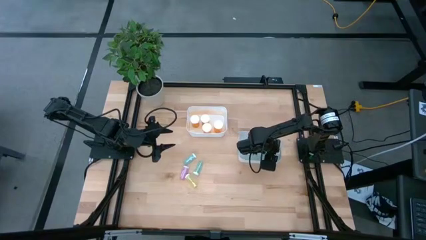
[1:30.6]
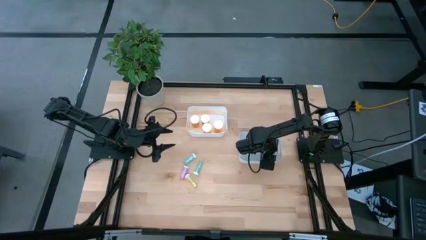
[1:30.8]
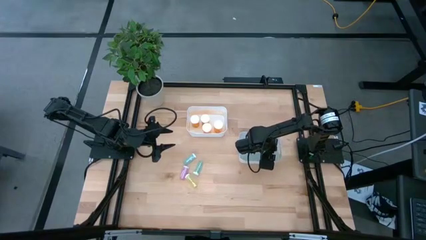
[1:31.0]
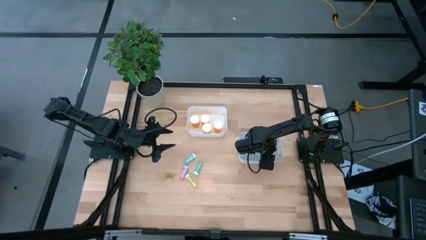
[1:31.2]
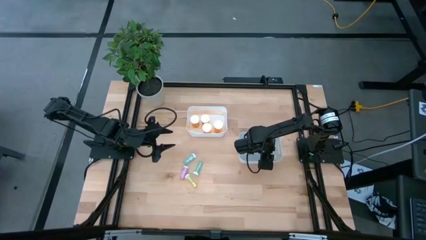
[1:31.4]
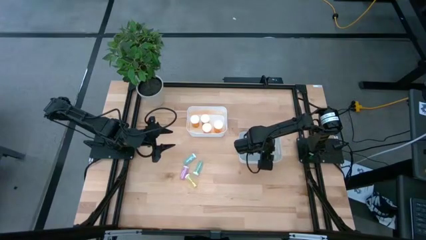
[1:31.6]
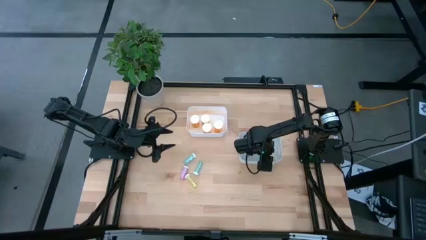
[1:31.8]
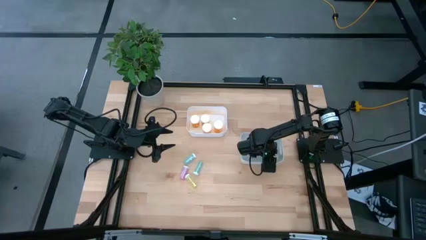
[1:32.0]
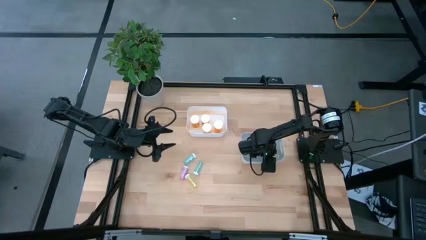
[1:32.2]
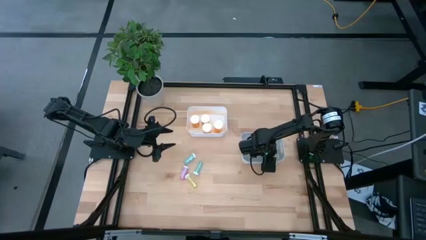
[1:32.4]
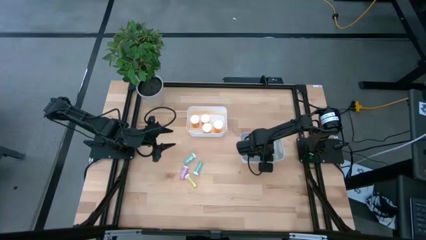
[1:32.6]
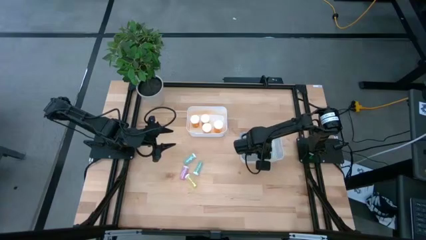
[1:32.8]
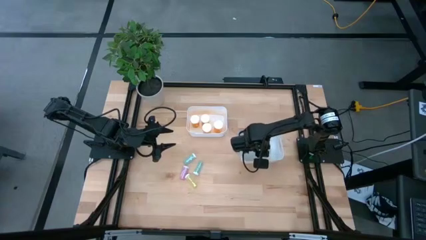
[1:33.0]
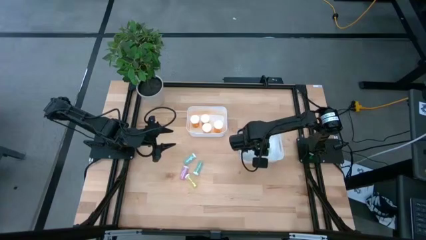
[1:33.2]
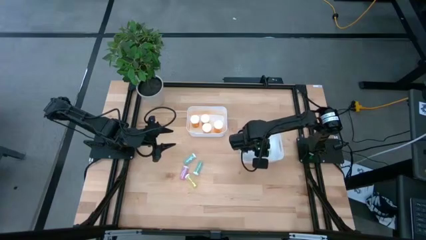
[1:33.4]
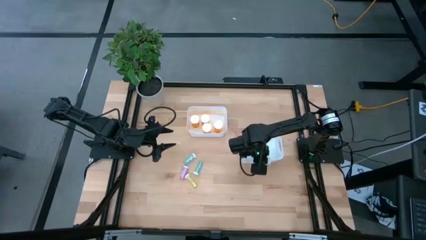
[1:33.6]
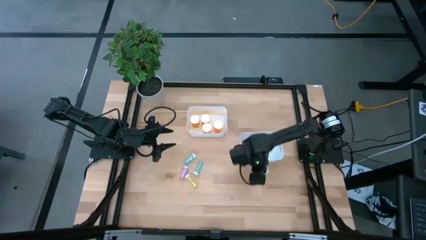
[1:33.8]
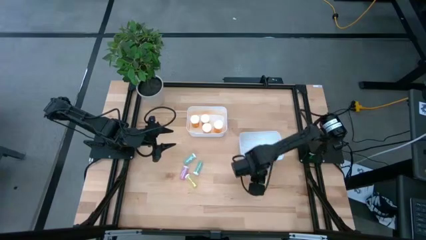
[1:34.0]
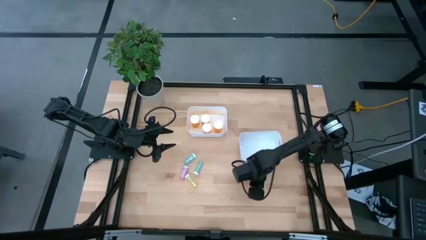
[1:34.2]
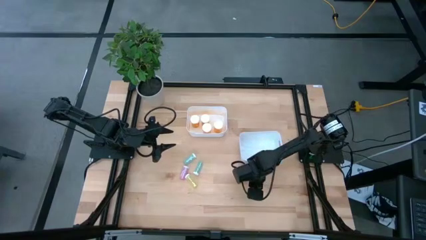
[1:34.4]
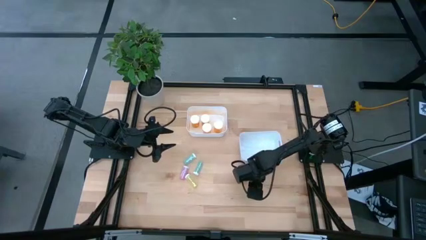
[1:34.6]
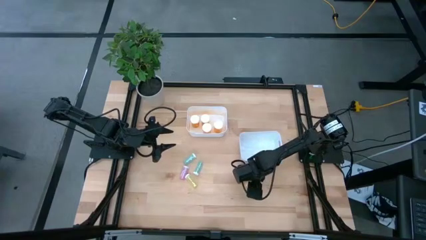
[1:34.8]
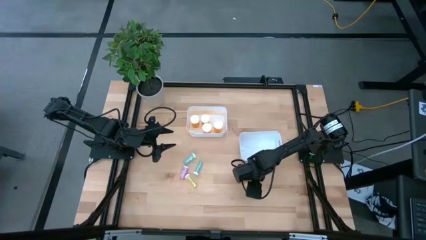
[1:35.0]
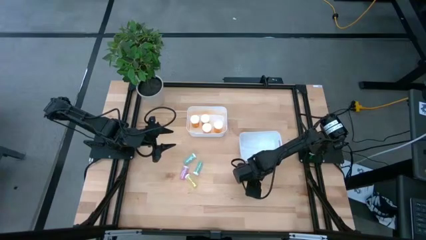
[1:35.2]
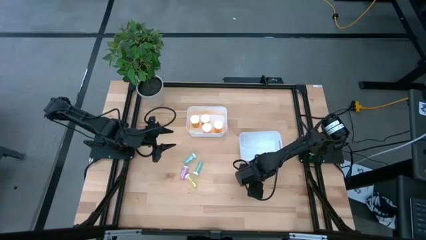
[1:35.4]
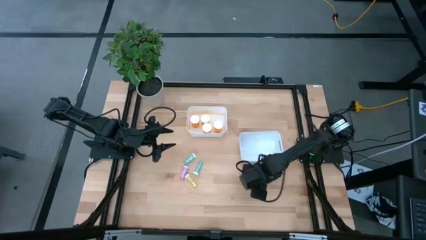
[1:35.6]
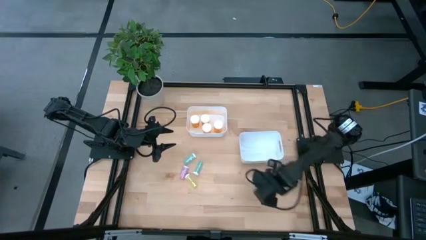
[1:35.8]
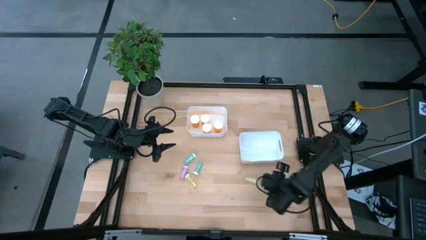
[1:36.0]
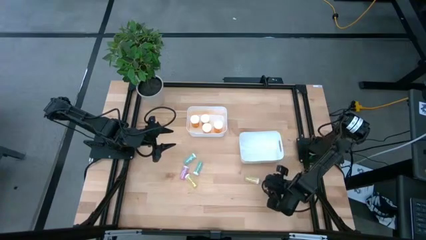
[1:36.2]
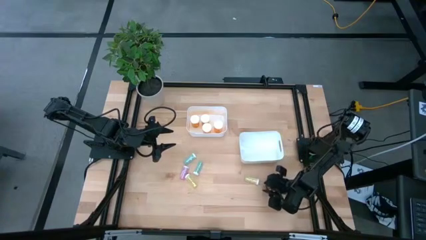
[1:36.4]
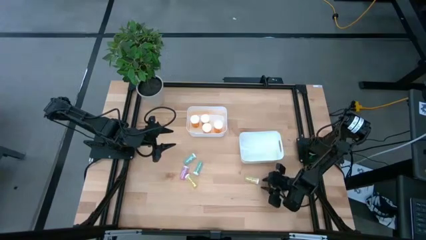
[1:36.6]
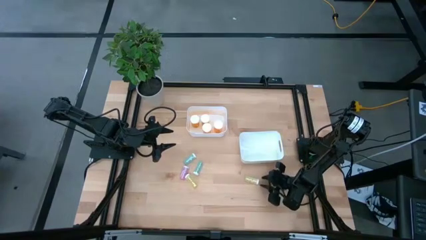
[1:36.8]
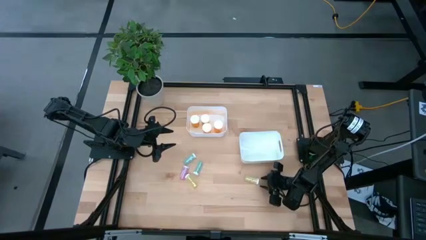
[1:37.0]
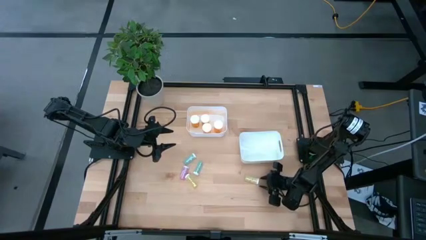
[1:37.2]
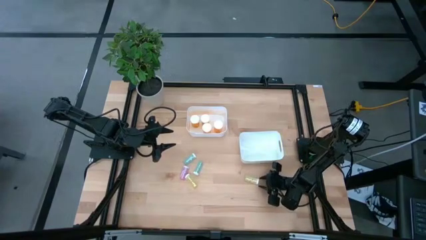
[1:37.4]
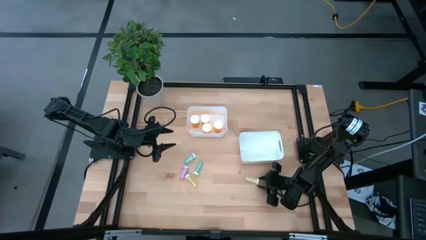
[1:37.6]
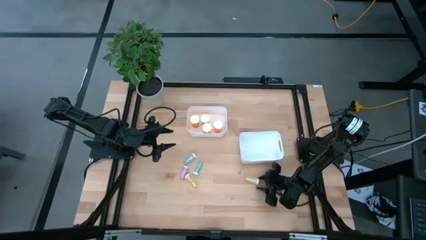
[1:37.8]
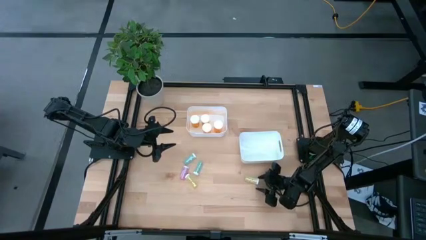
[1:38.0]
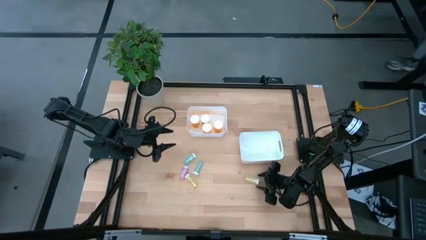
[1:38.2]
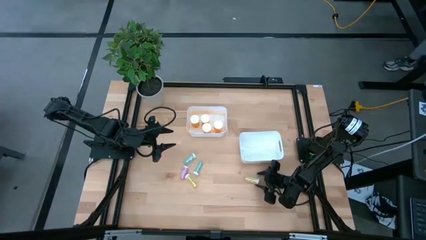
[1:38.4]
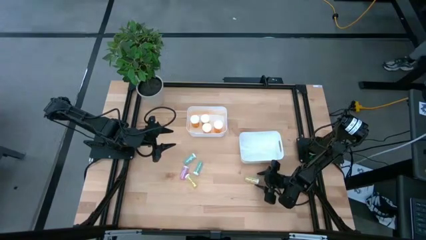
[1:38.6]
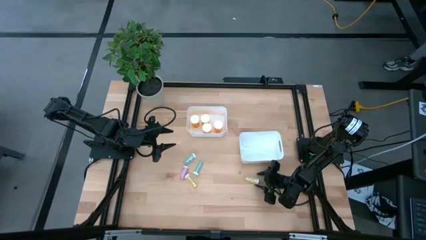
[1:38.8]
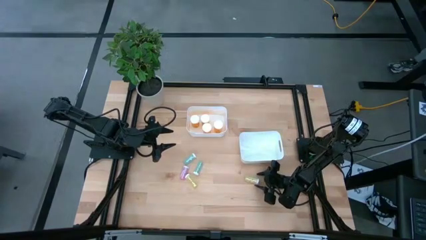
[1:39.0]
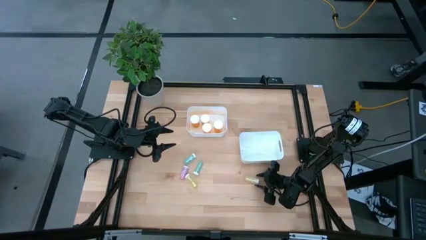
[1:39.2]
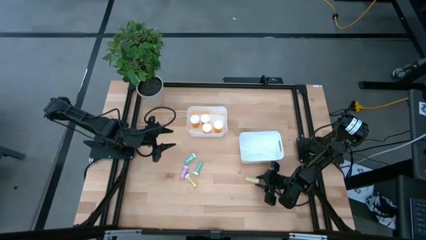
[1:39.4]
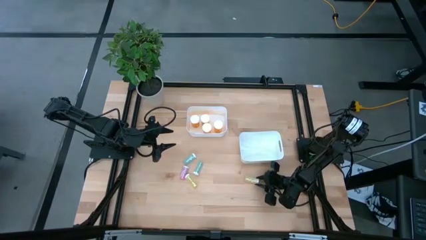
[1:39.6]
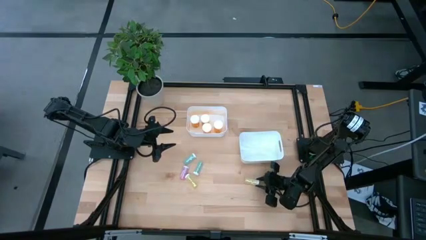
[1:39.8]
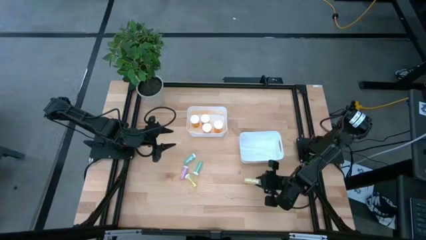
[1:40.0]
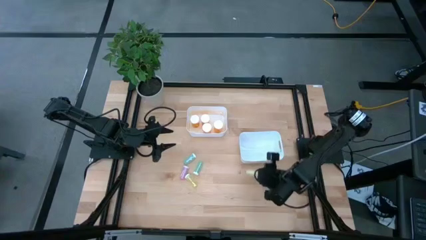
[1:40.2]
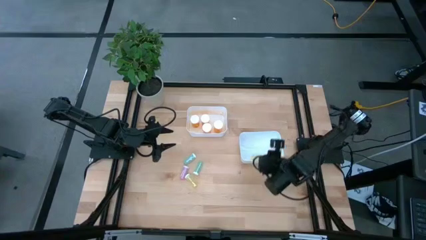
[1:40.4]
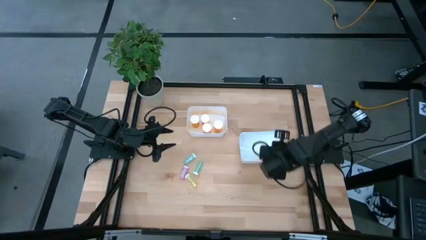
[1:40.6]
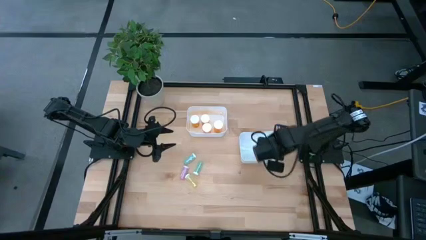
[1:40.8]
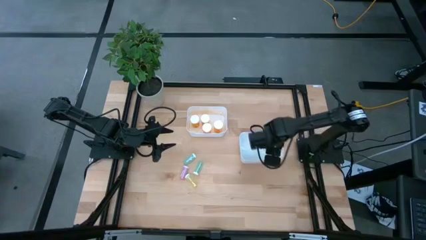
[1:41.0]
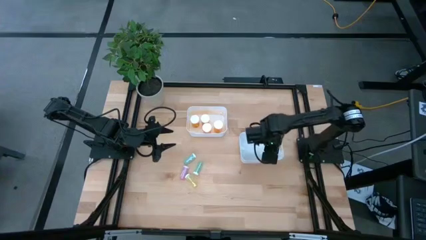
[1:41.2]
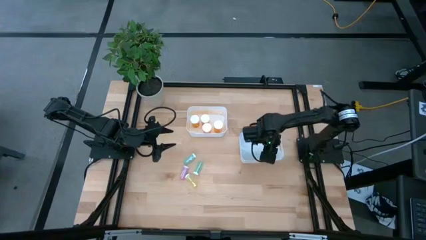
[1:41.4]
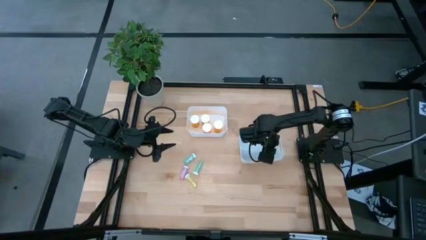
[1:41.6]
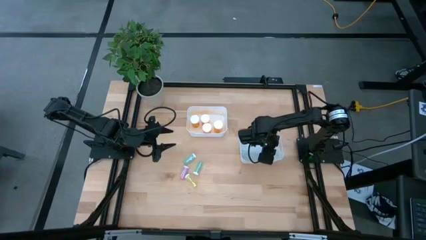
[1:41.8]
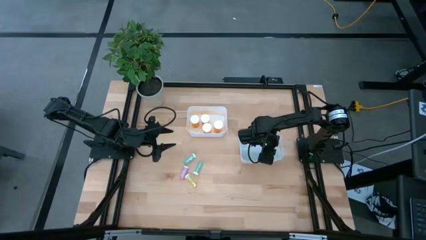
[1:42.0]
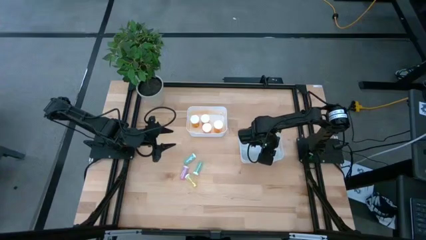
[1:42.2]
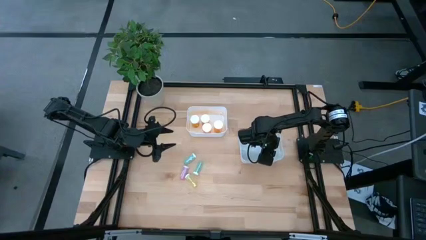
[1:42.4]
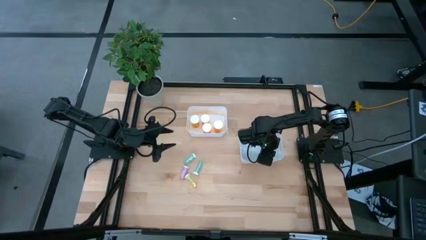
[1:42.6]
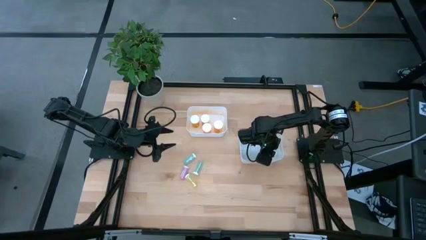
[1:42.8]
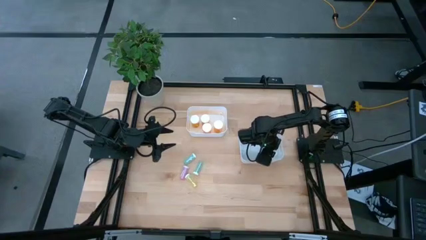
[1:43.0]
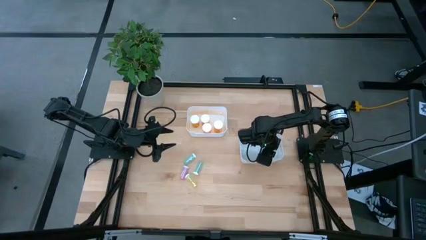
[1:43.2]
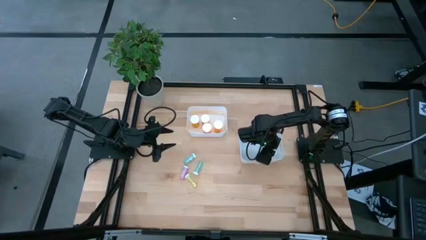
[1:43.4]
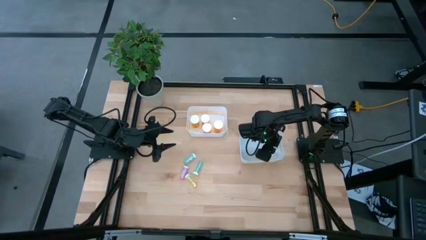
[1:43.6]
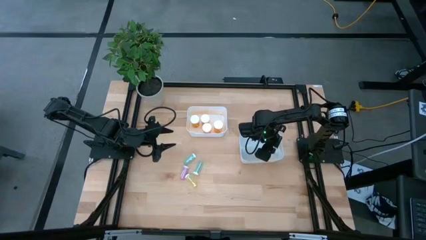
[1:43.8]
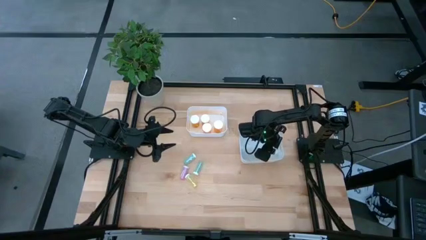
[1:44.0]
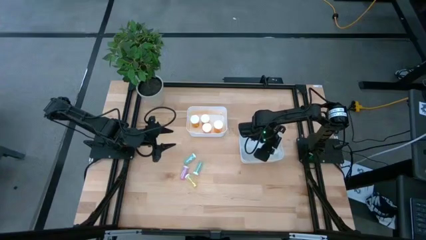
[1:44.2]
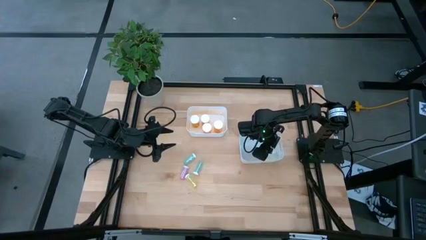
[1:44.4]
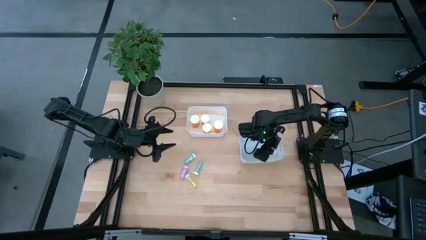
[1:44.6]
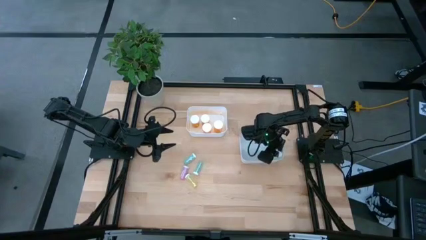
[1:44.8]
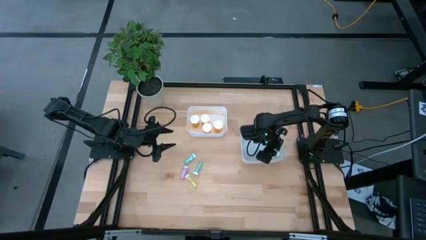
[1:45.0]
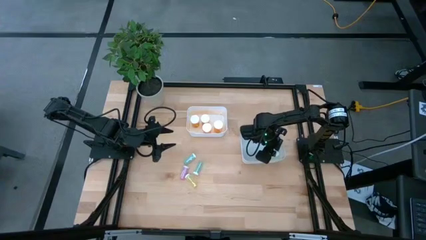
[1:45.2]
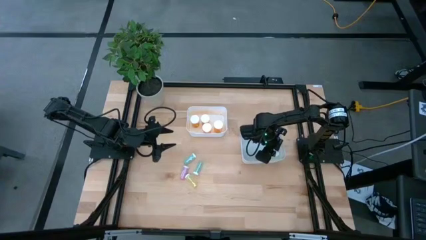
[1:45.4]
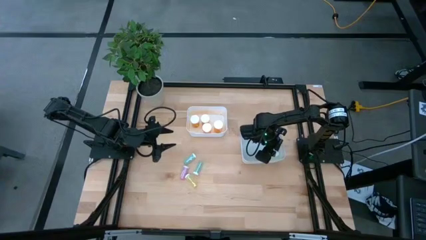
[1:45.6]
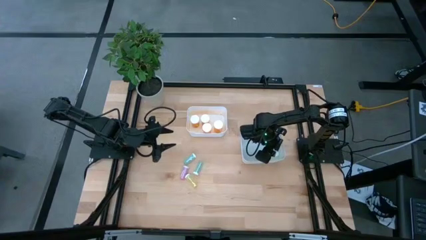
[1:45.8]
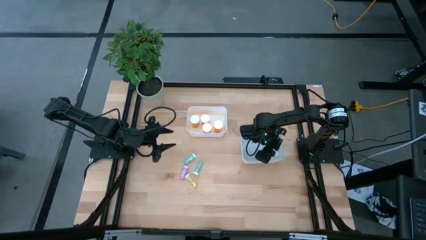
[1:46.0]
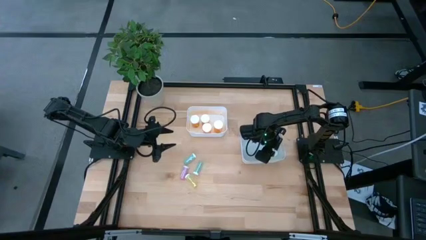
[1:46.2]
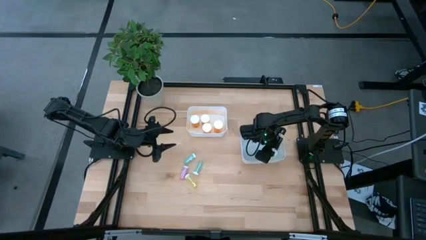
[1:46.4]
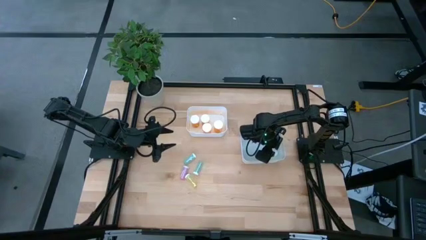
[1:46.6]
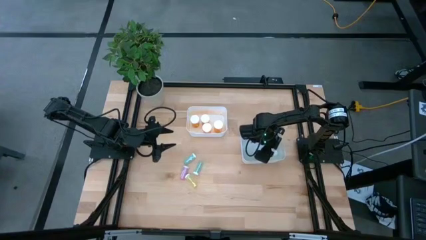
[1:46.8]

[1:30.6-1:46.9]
Task: Pick and place medicine bottles into bin by pill shape (circle, oval)
Put the small yellow pill bottle into the bottom white bin
